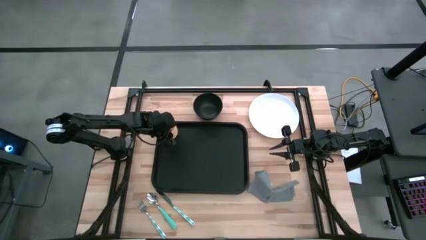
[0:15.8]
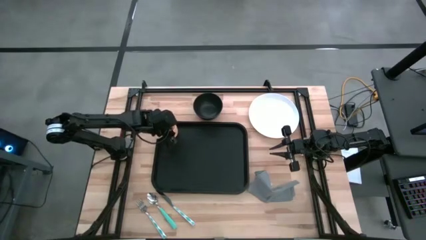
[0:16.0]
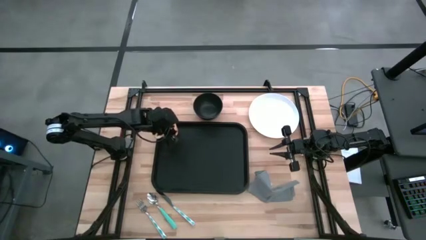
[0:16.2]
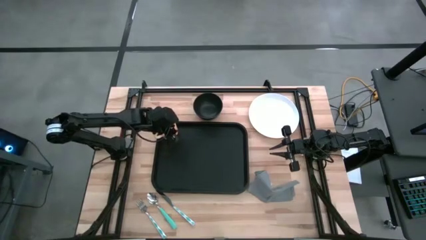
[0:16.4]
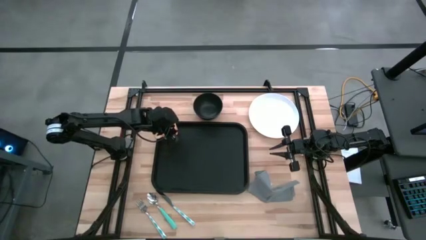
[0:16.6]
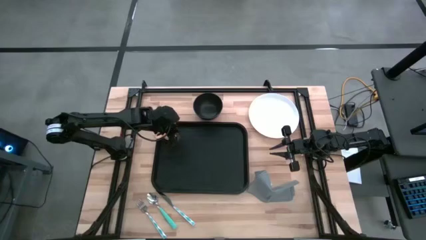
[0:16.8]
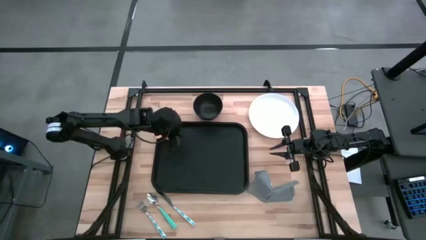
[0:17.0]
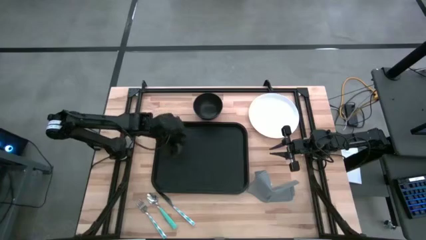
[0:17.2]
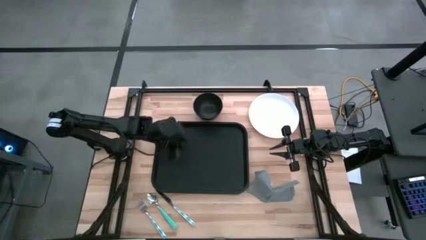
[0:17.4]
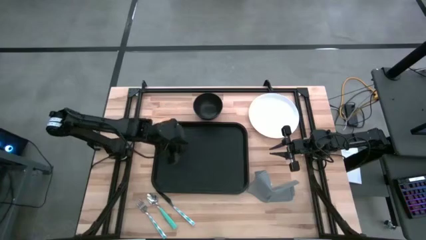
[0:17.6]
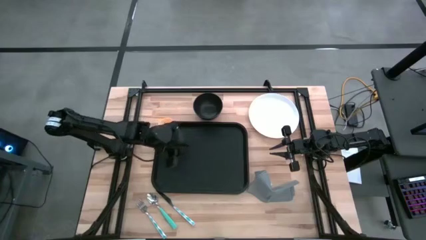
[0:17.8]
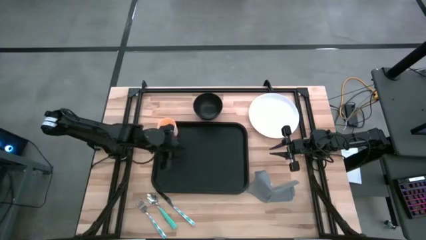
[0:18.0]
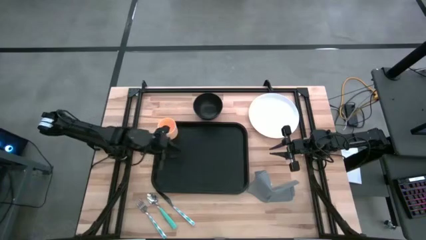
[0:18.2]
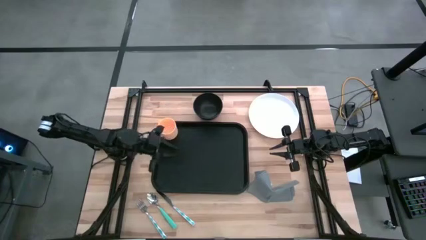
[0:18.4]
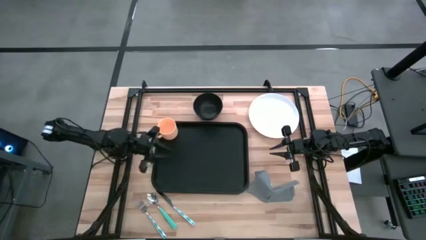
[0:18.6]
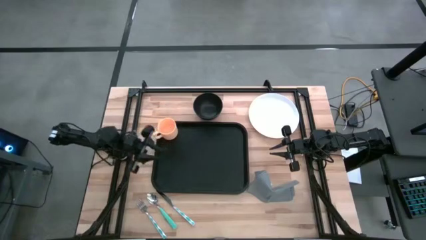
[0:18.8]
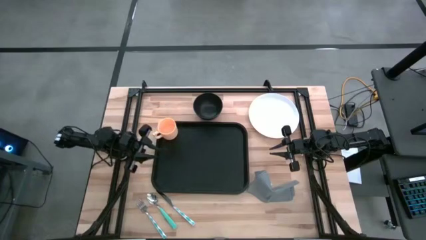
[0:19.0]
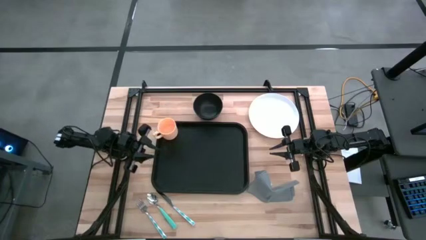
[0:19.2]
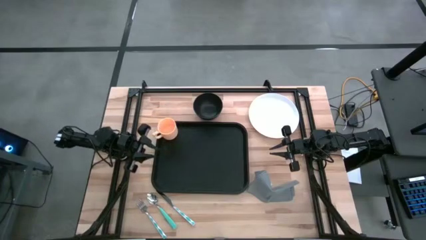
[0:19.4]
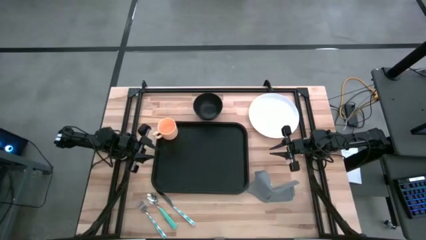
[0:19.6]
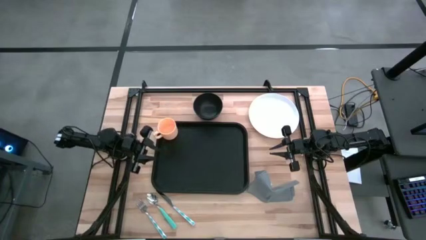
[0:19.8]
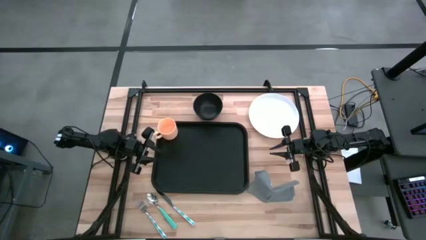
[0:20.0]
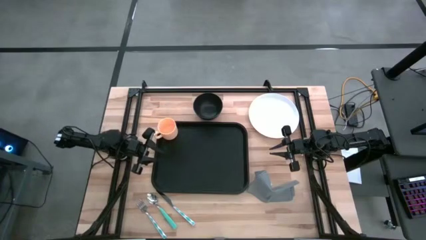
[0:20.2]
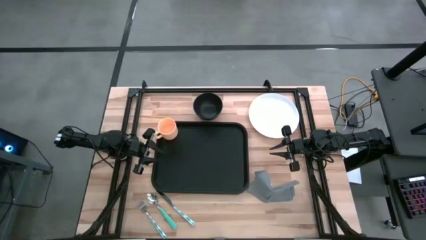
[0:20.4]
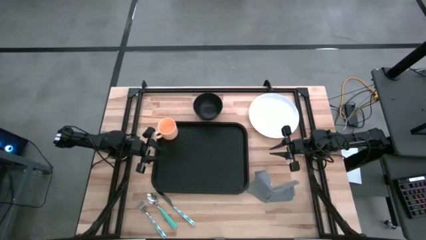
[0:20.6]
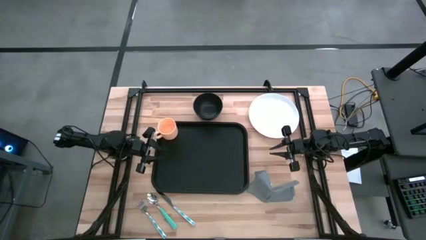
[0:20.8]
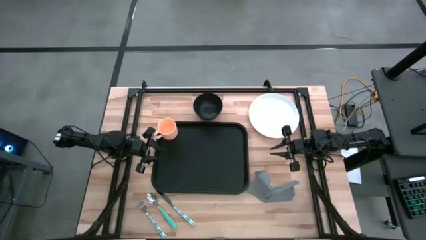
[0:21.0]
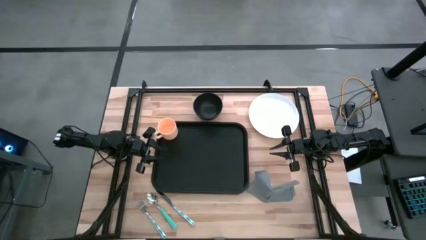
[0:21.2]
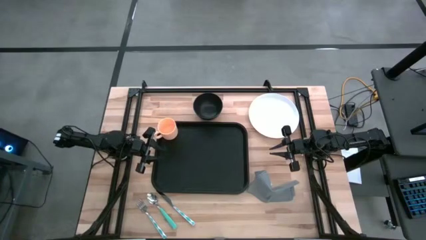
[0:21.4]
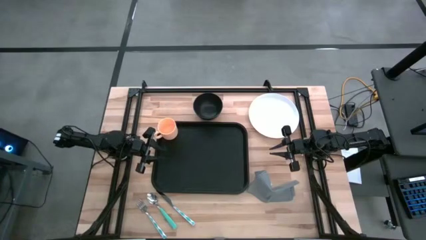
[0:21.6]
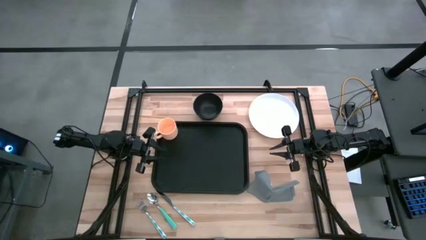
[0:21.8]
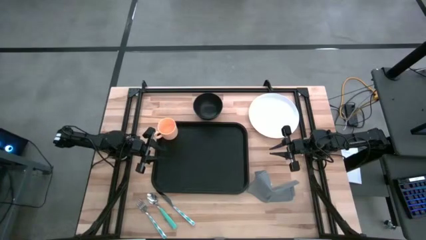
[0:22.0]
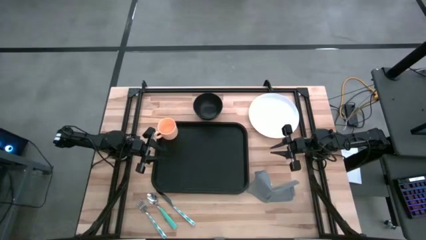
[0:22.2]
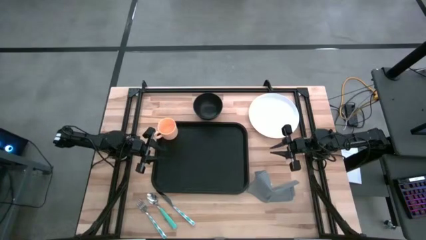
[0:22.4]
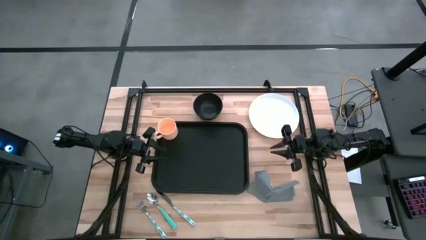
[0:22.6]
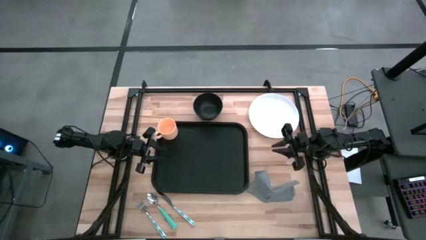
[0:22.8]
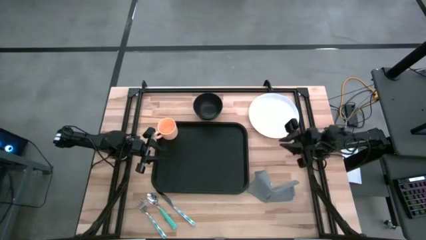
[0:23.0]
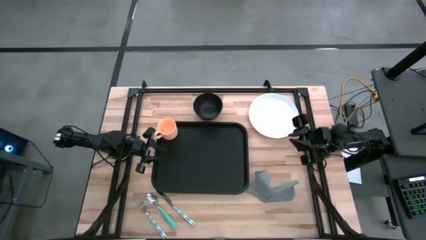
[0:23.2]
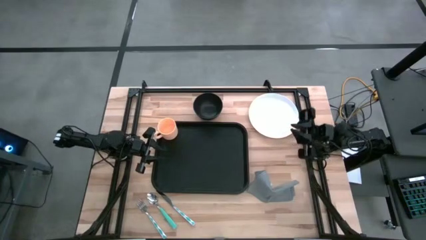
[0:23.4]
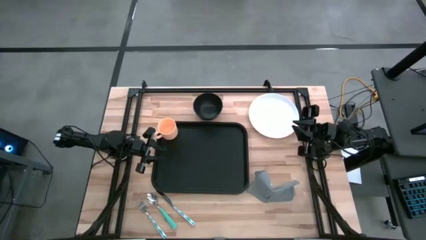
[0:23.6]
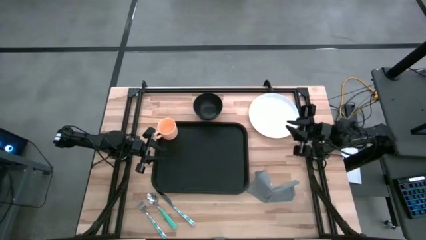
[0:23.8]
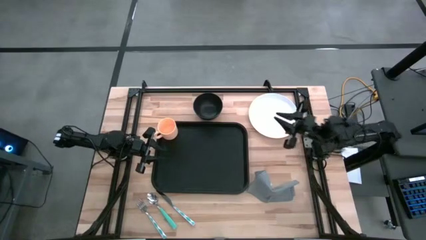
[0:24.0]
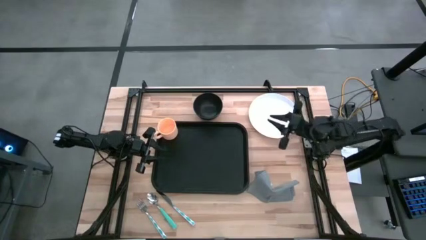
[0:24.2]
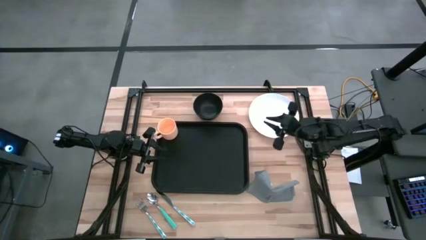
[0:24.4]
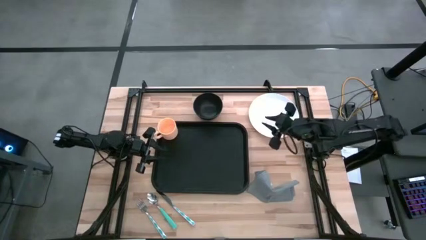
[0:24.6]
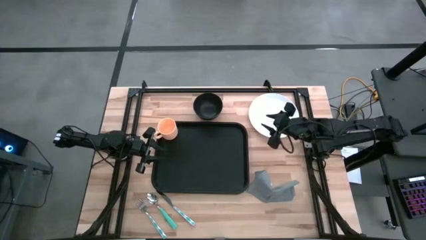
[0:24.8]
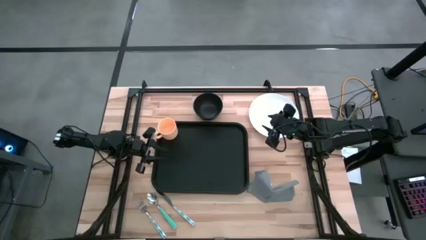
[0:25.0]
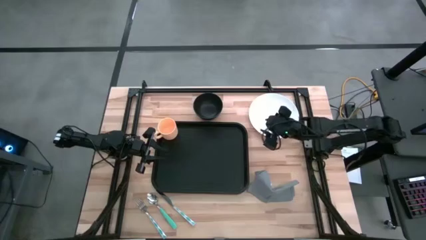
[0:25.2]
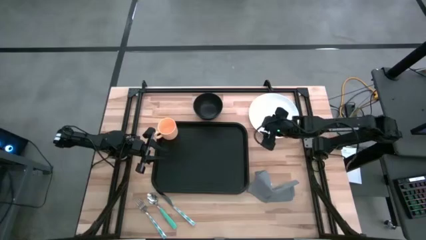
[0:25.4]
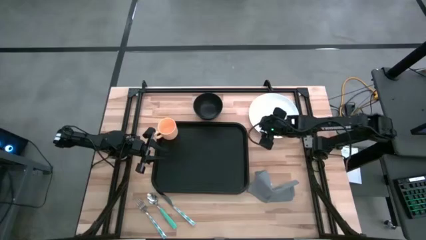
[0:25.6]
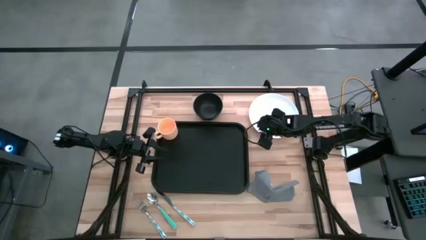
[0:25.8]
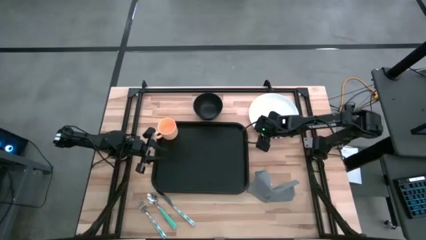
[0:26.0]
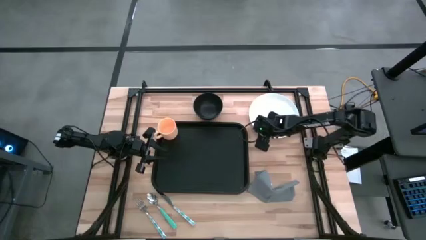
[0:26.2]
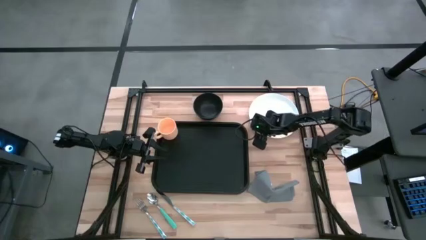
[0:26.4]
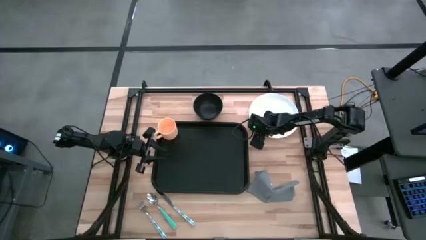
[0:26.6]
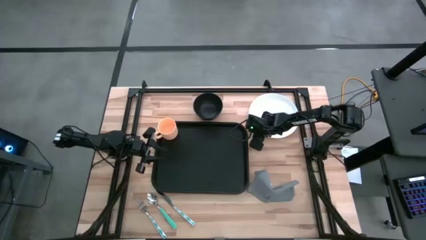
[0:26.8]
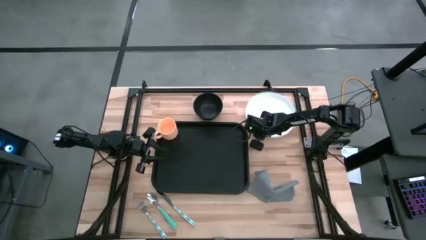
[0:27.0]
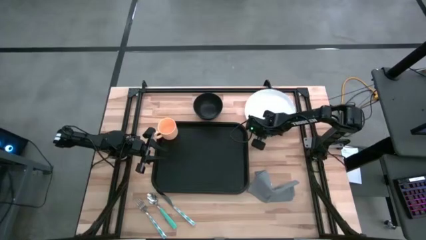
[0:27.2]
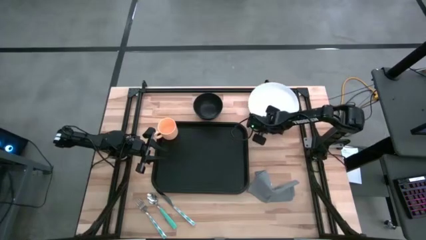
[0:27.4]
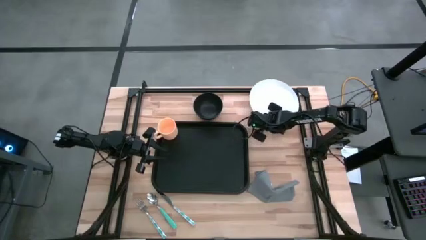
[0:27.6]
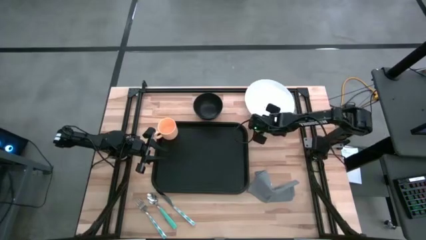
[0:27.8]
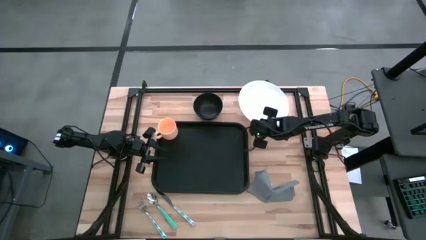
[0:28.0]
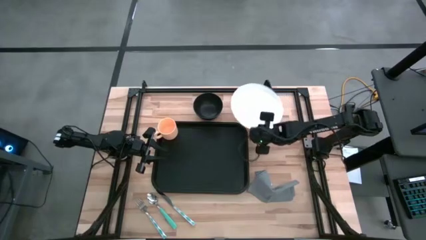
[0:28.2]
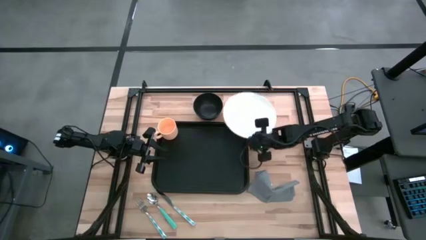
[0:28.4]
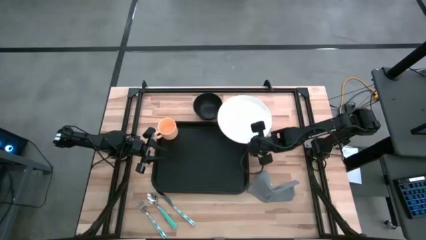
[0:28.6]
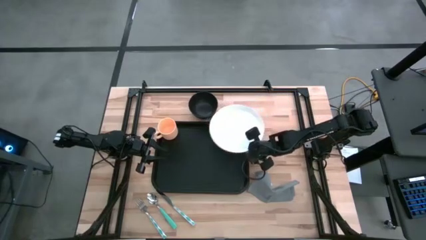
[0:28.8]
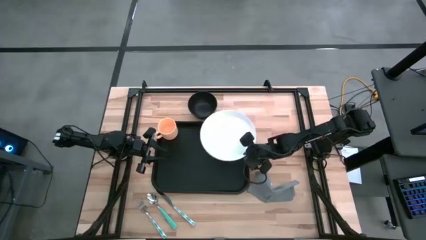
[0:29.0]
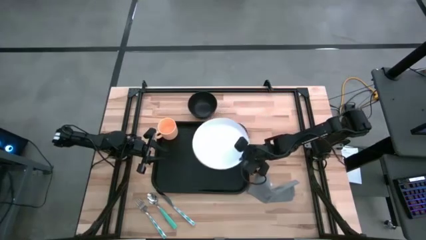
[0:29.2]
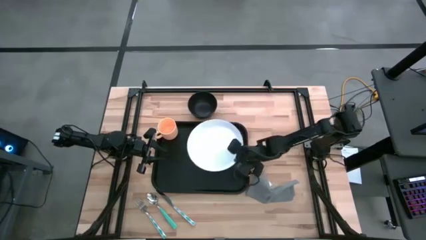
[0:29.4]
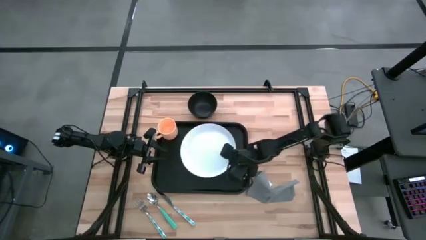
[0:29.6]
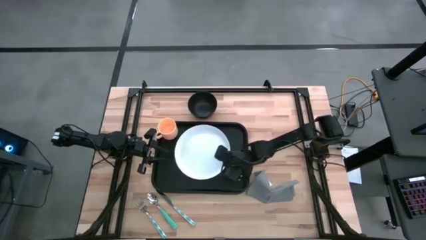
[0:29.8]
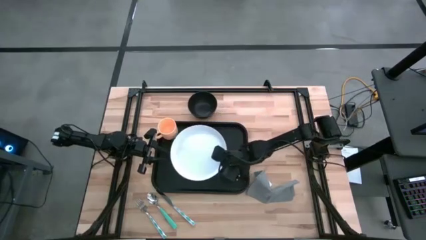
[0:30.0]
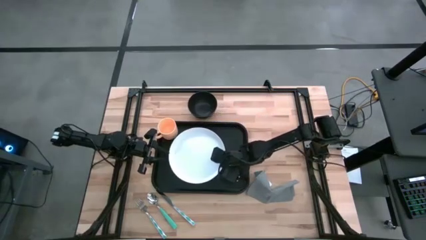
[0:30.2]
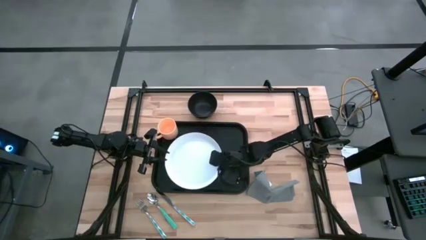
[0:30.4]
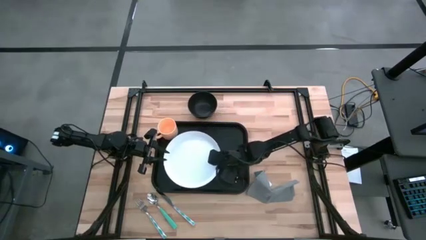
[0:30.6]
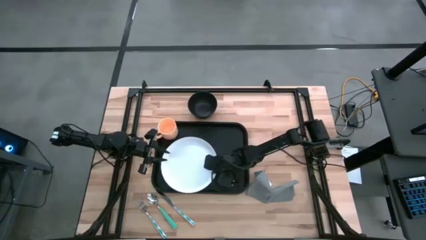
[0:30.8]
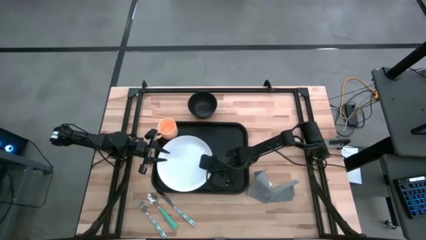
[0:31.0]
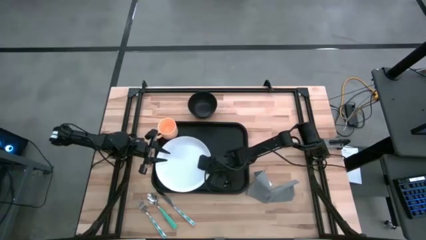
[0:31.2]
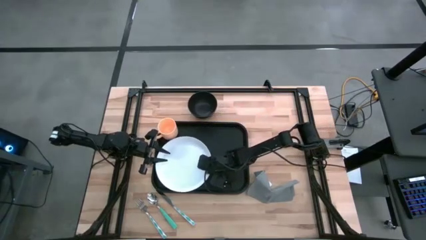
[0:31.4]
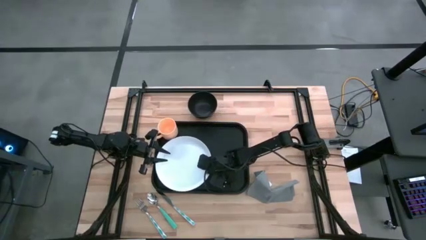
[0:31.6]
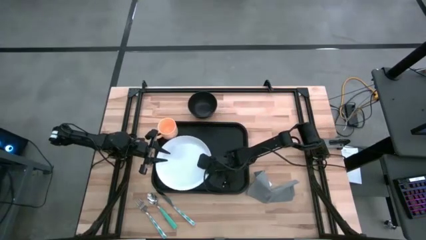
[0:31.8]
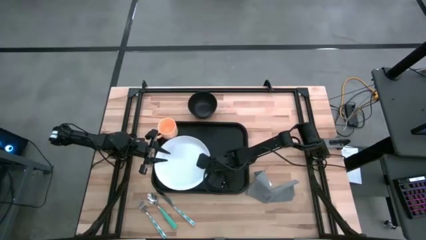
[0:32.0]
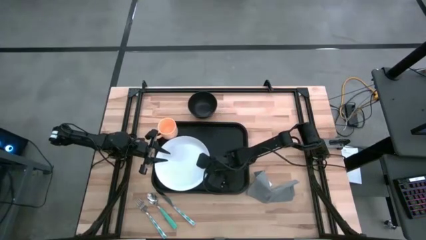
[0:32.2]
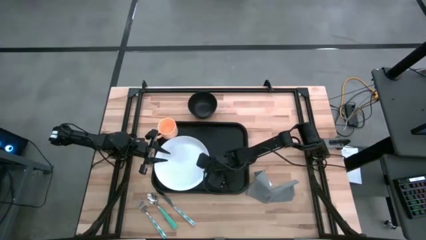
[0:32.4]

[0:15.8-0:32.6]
Task: Set up tray
Put the white plate on the black serving tray below the orange mug
